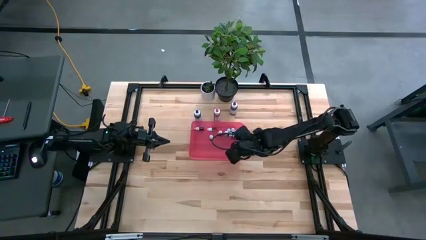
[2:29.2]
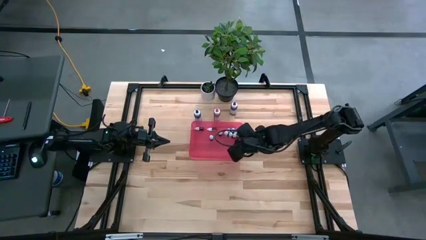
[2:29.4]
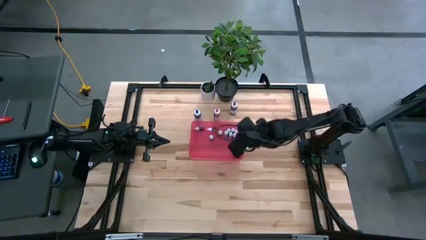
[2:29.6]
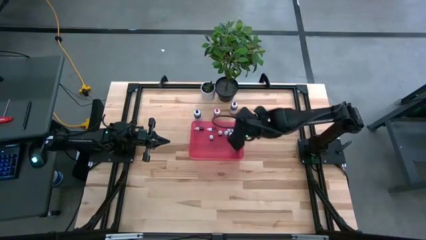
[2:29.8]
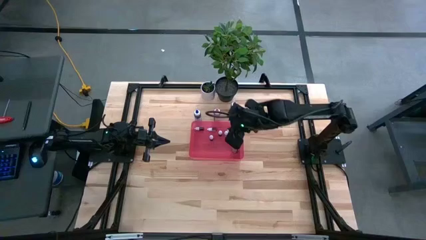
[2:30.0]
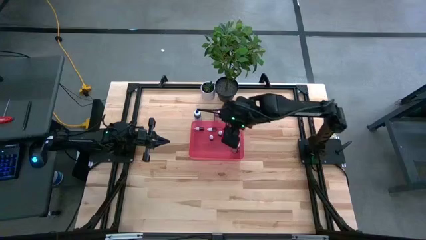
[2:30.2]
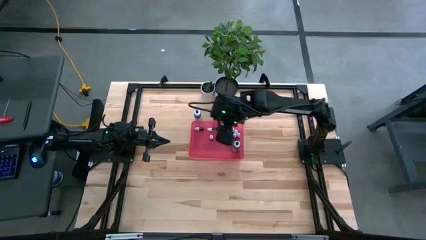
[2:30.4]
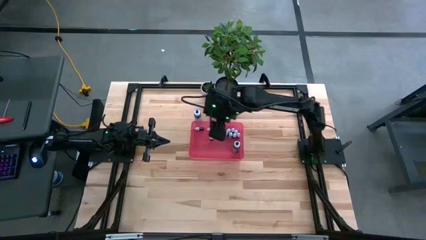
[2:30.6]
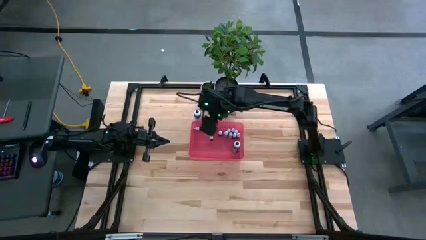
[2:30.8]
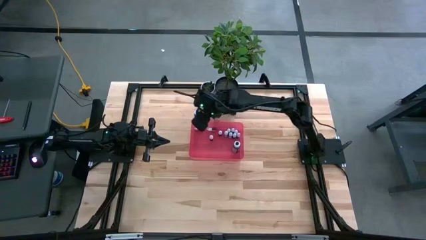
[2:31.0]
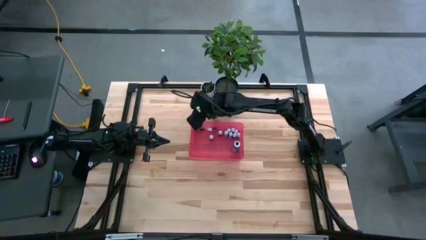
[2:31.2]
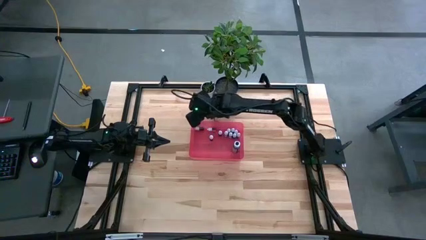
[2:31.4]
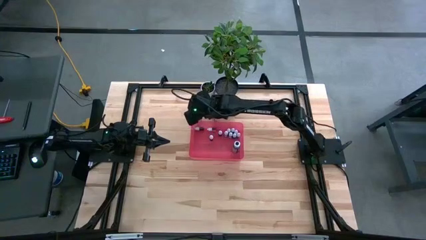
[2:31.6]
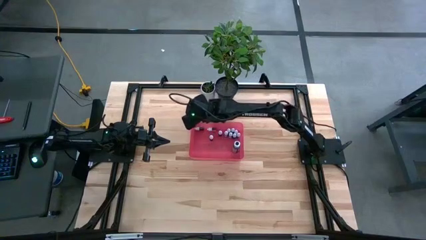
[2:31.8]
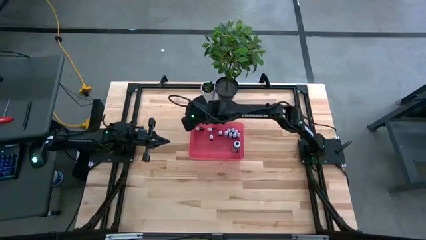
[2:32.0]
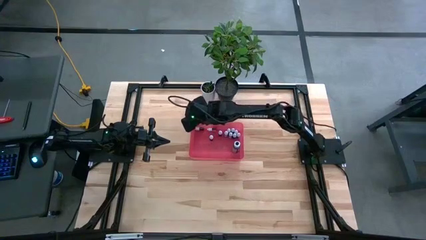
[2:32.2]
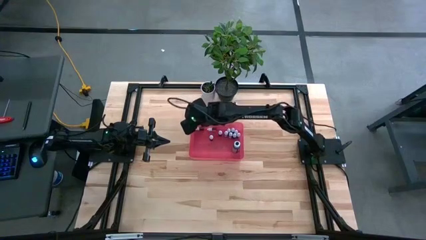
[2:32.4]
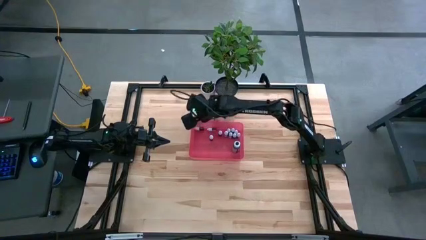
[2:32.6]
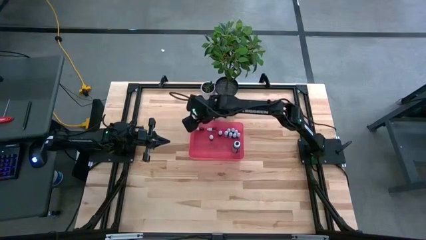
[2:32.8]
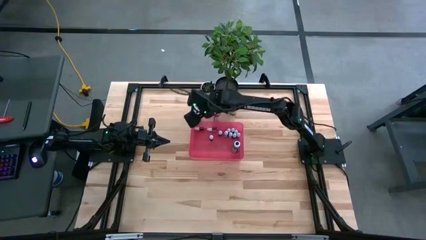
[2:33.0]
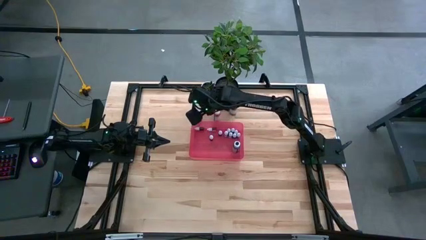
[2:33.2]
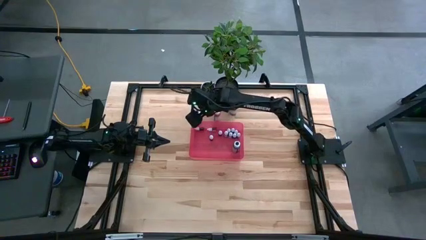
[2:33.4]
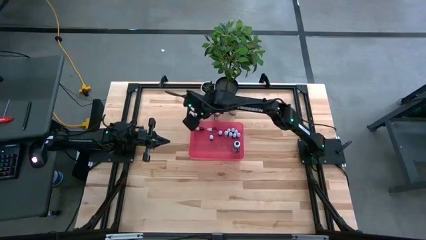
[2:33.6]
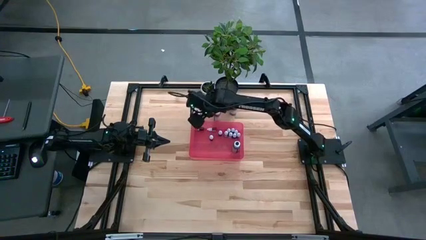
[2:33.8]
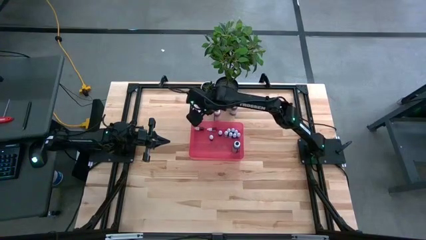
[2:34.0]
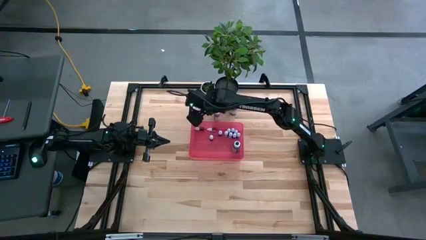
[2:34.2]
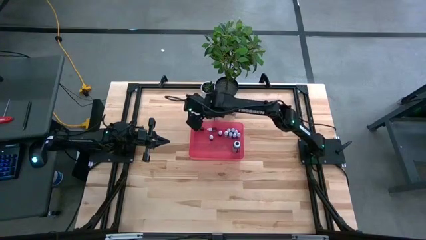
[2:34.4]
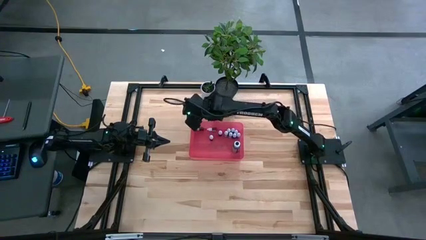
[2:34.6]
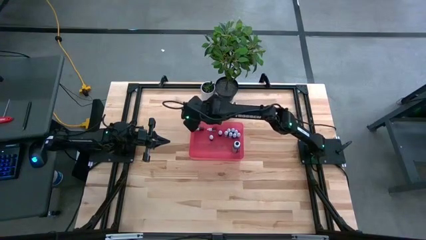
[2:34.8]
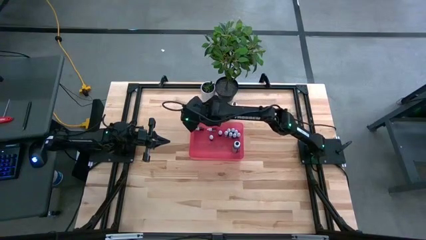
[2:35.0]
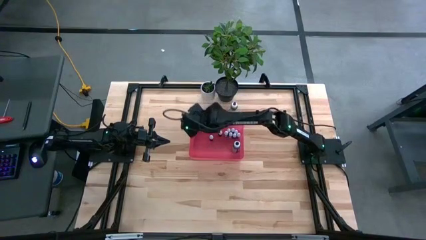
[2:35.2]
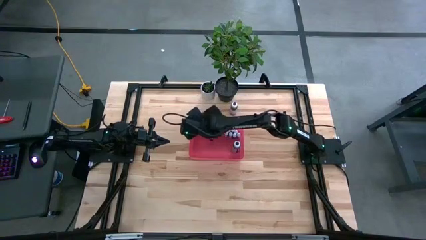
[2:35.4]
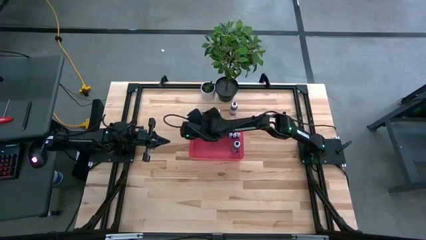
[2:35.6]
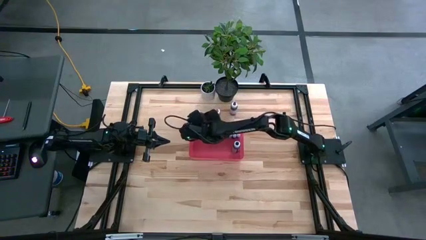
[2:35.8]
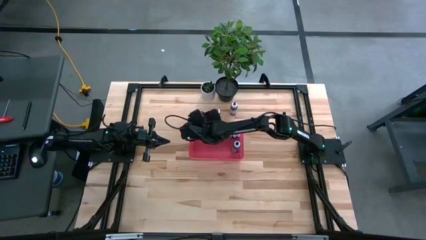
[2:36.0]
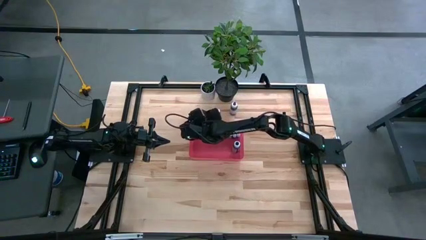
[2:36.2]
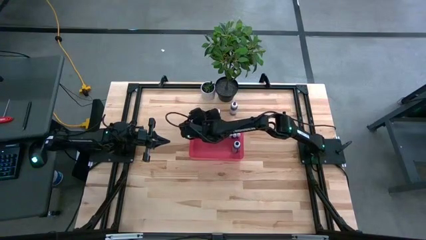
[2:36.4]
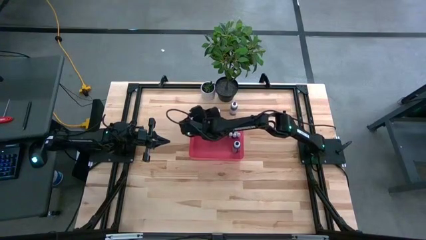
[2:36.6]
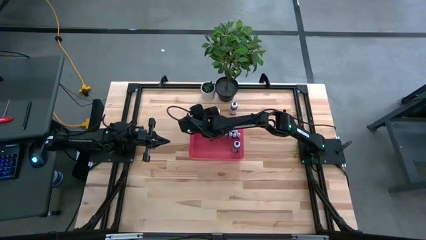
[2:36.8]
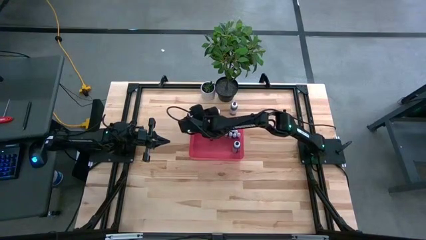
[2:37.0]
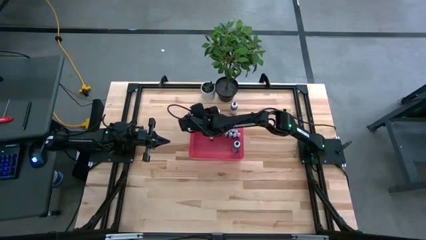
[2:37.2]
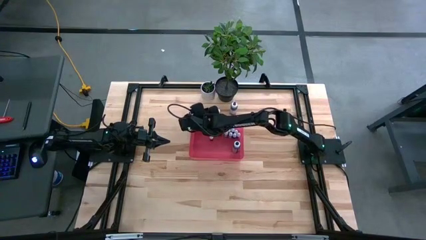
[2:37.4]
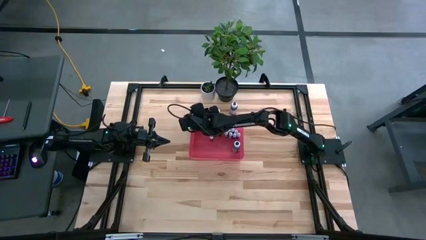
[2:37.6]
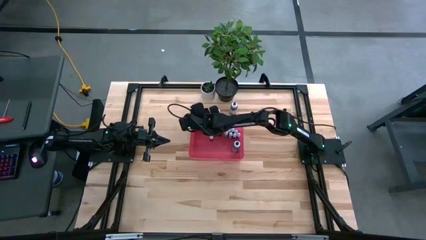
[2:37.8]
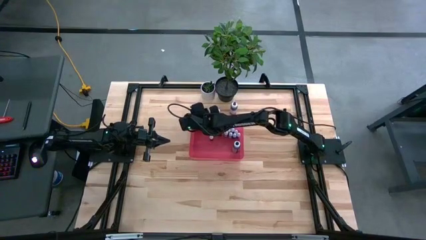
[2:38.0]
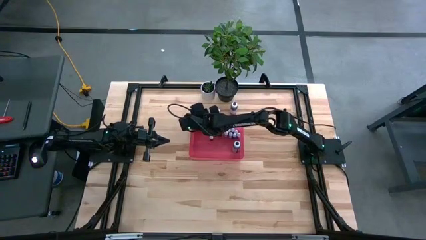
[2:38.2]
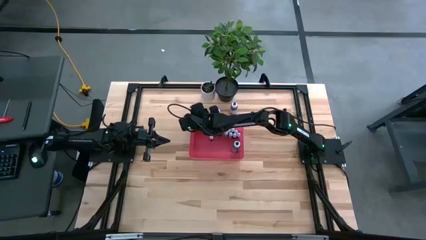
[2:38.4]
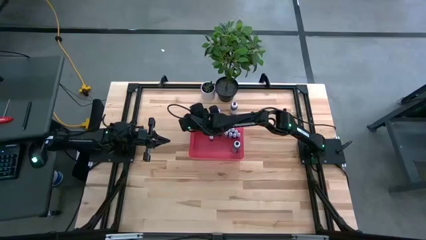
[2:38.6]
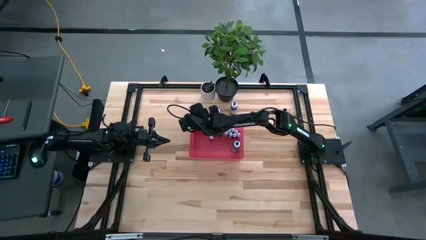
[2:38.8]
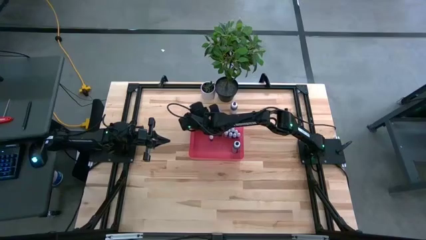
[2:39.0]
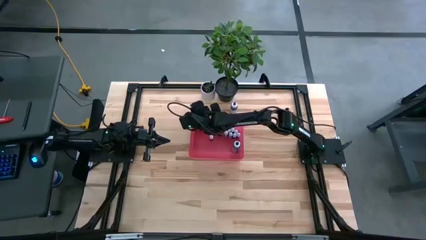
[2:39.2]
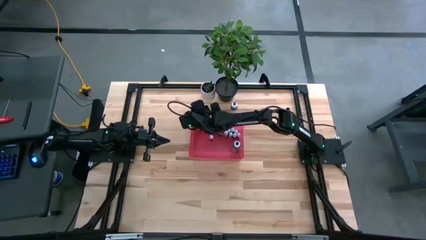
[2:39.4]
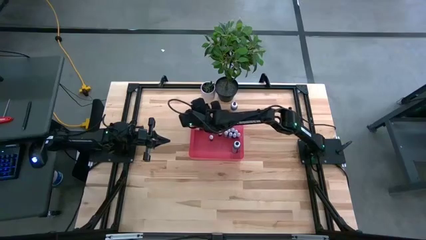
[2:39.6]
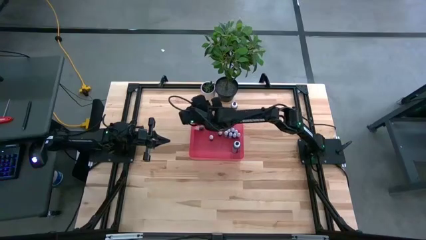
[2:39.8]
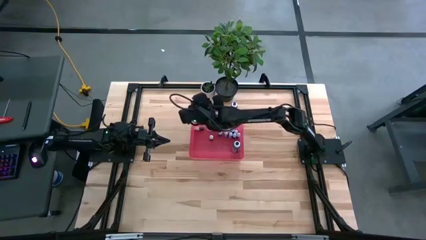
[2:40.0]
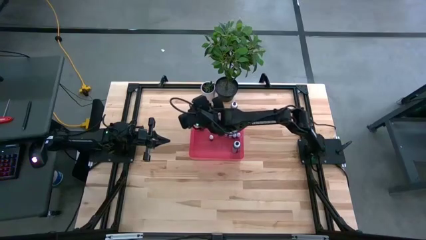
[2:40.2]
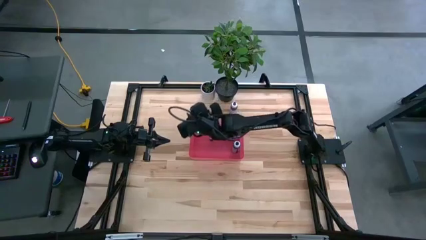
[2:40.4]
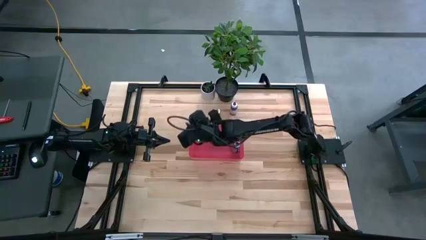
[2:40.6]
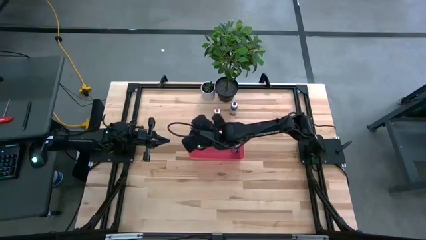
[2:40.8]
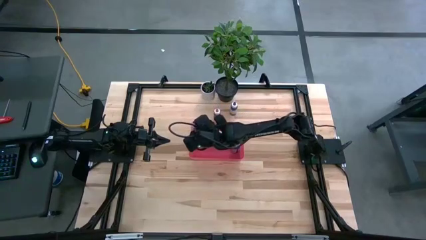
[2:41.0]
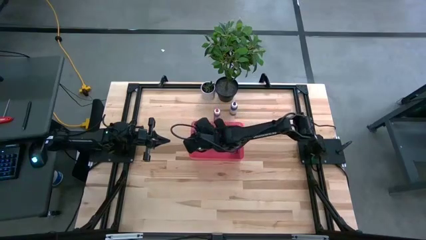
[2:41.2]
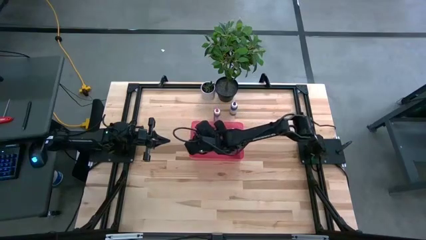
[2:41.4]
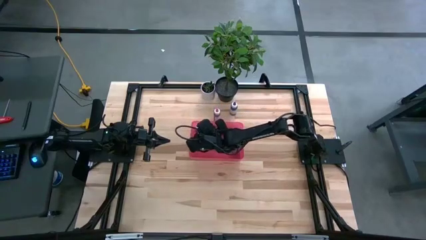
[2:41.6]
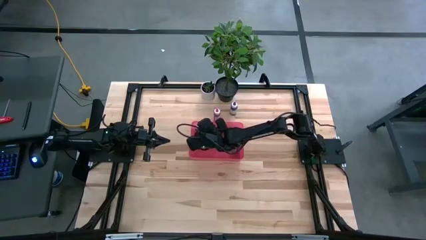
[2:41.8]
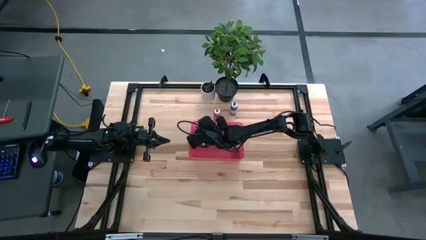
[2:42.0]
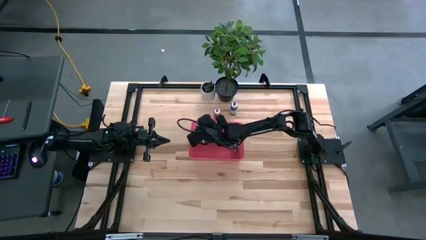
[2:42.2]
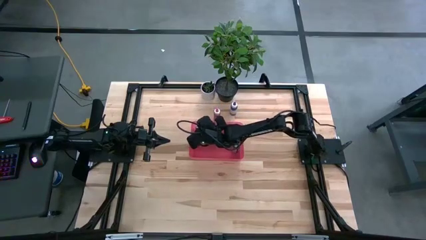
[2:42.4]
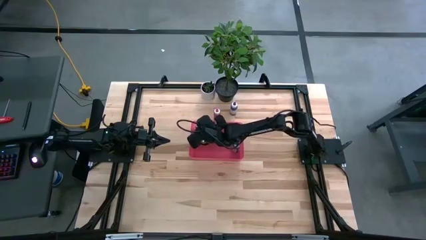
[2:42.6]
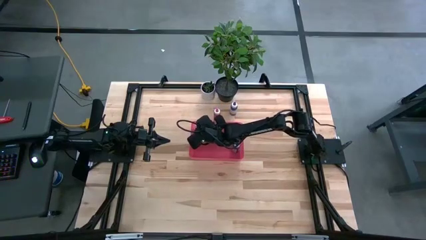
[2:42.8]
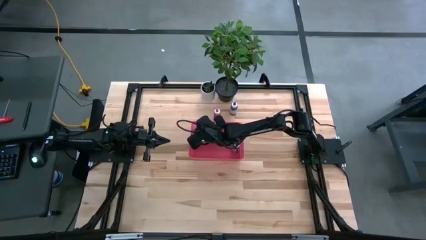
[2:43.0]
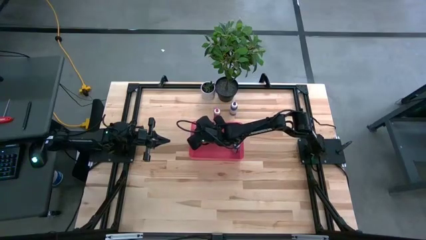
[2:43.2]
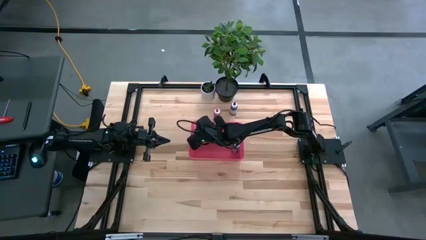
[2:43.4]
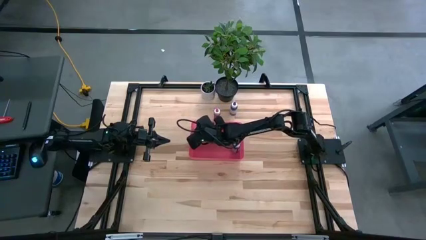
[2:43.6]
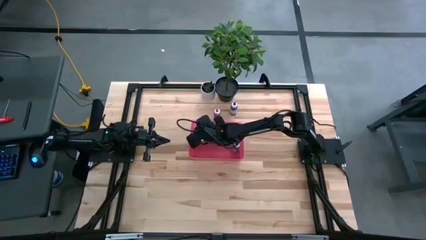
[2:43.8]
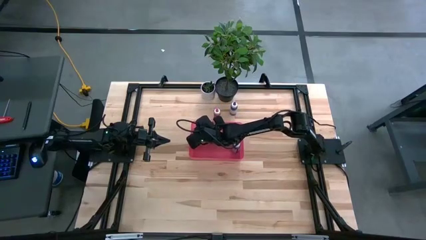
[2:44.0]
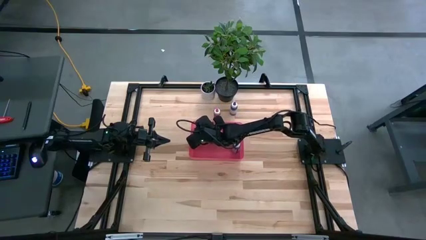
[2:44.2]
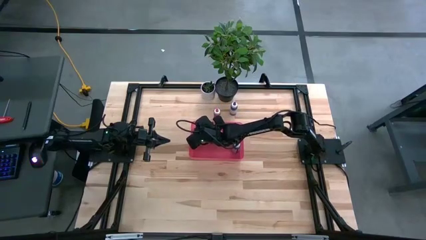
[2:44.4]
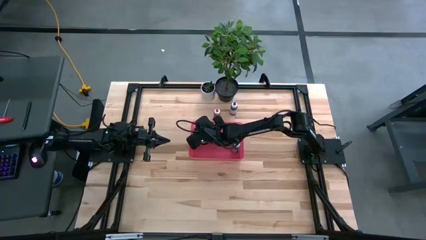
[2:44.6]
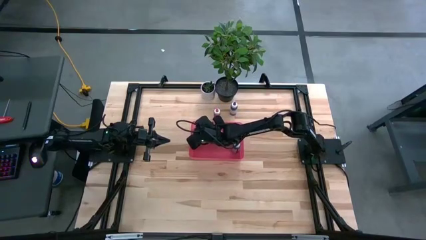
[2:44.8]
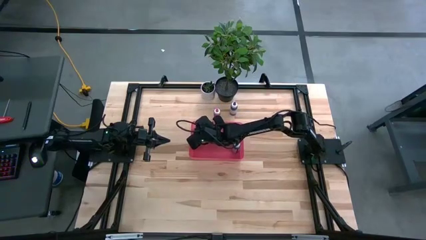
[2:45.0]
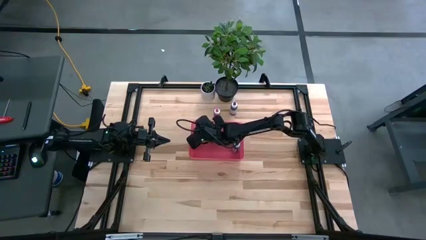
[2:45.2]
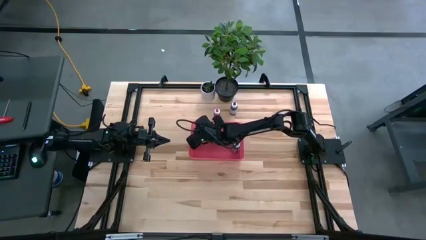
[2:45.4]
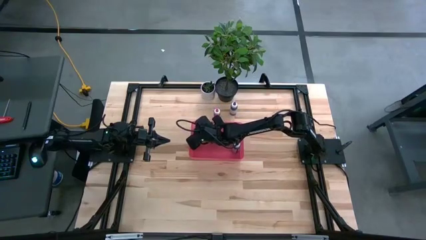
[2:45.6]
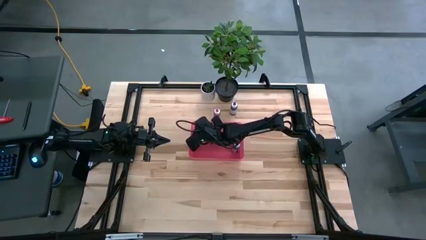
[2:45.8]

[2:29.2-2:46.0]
Task: Pick & Place food coloring
Put the large blue food coloring bottle into the pink container
